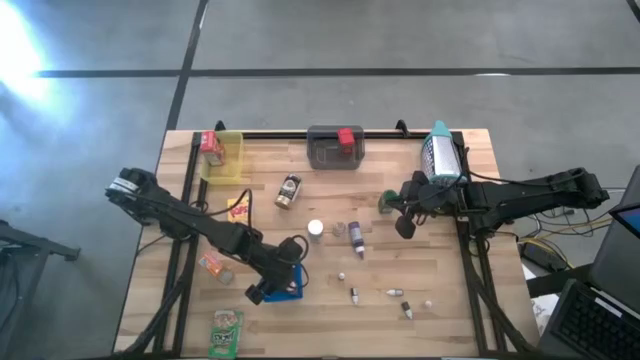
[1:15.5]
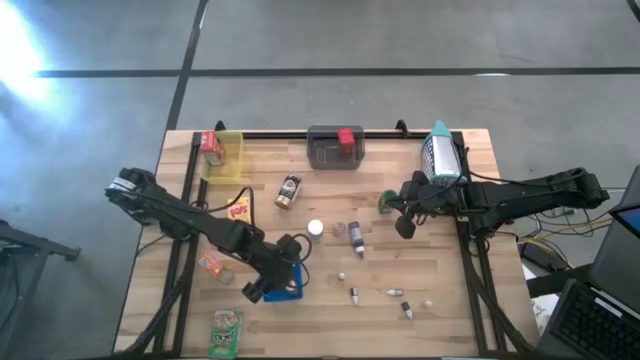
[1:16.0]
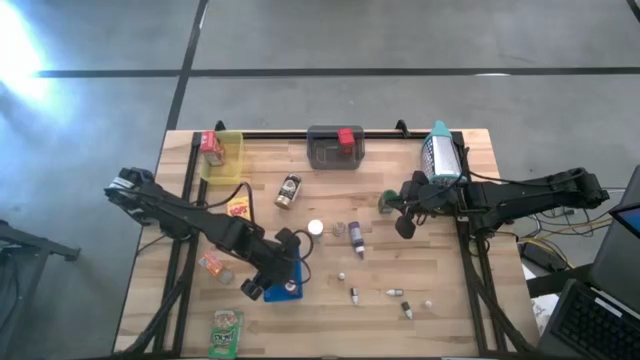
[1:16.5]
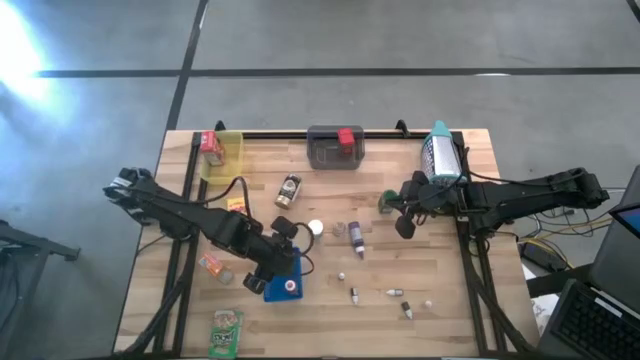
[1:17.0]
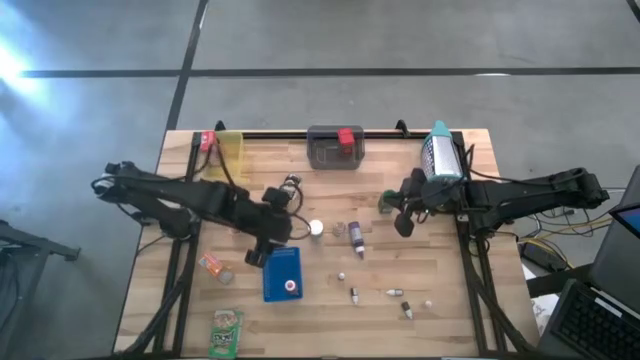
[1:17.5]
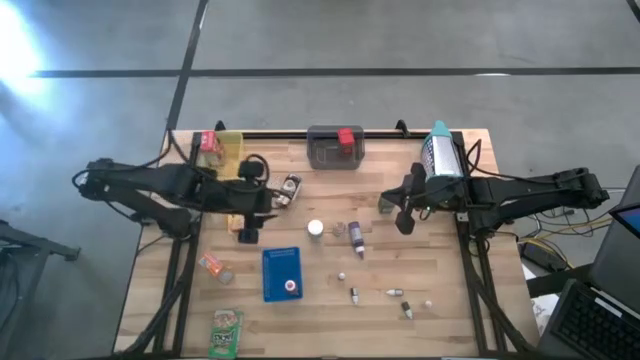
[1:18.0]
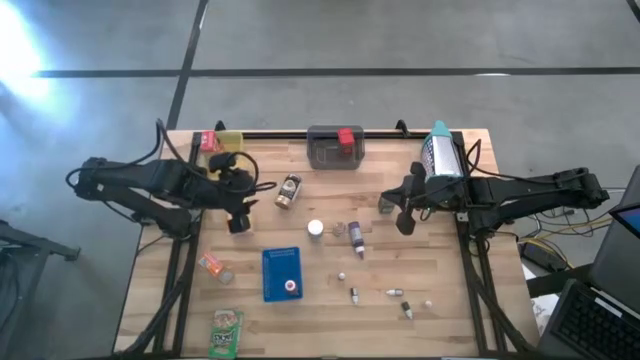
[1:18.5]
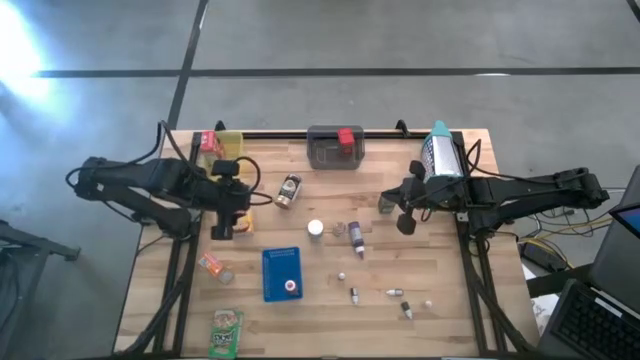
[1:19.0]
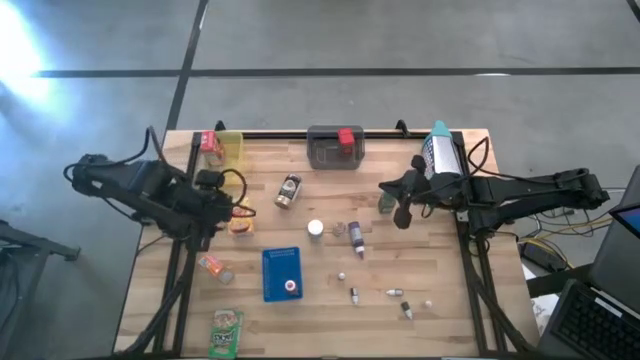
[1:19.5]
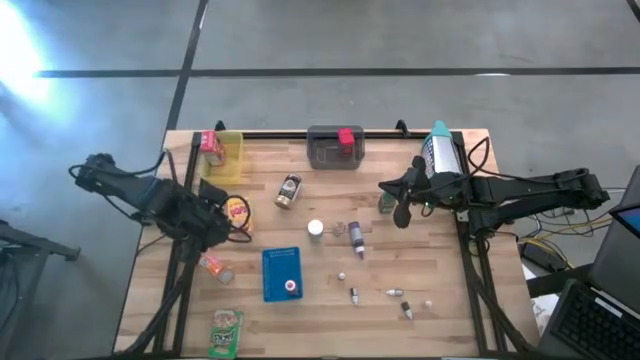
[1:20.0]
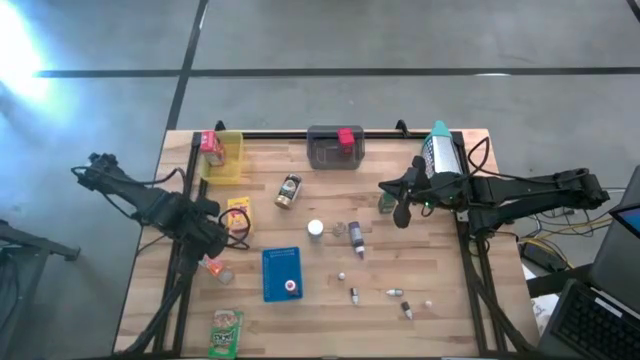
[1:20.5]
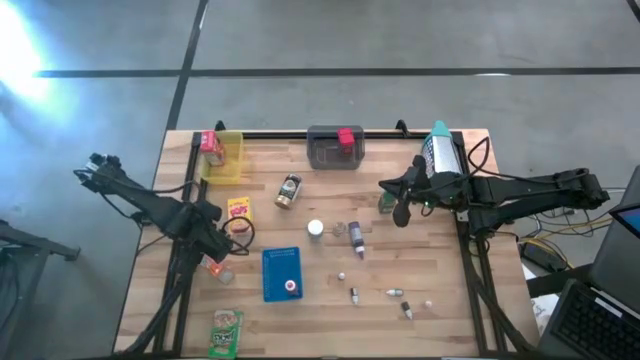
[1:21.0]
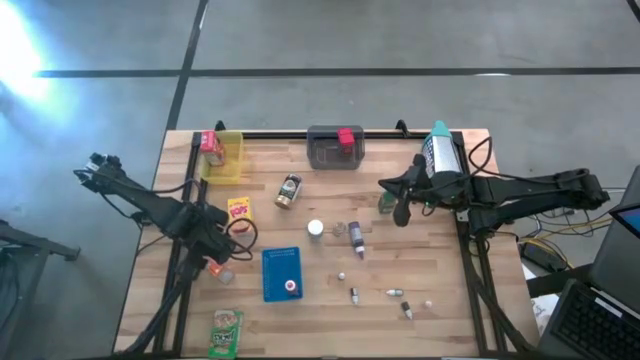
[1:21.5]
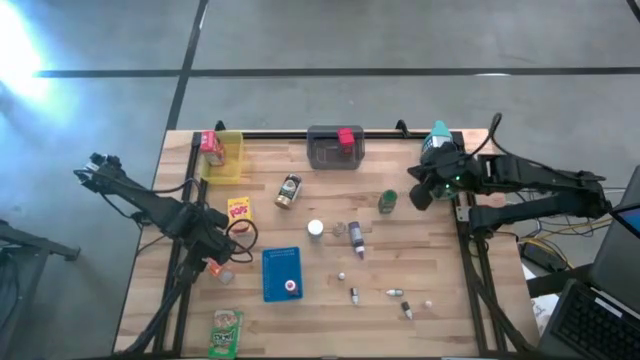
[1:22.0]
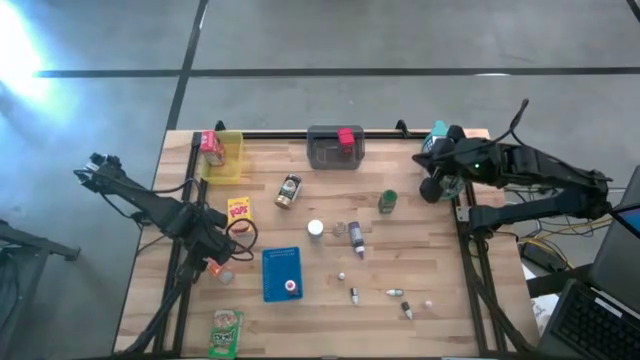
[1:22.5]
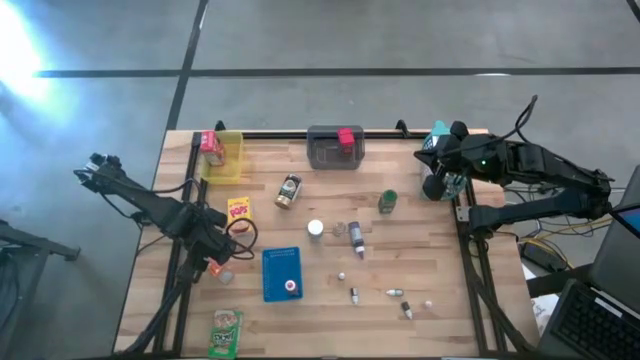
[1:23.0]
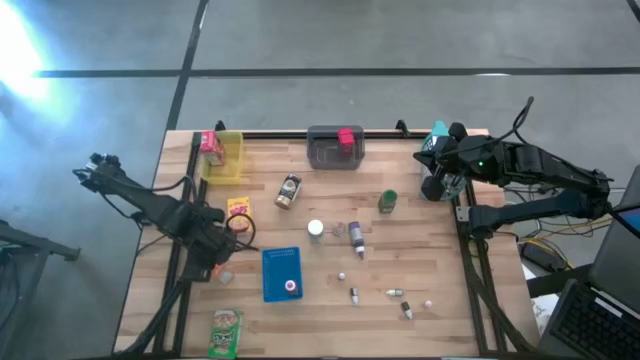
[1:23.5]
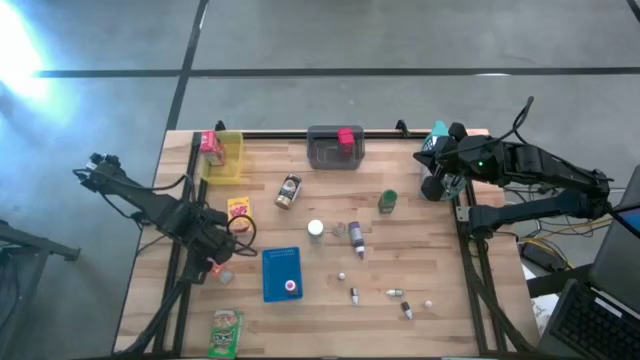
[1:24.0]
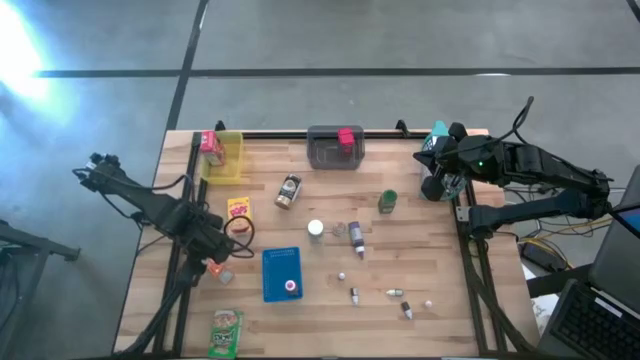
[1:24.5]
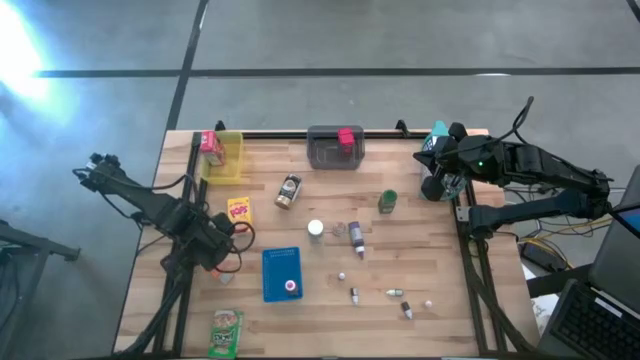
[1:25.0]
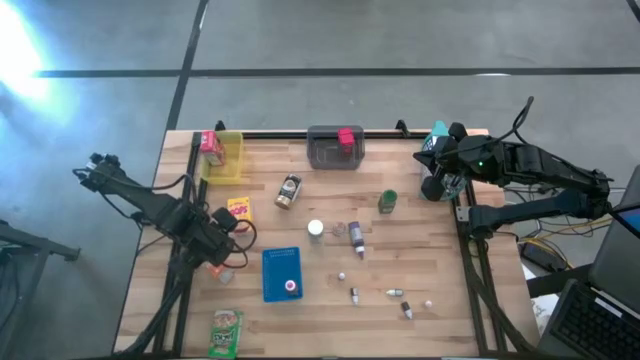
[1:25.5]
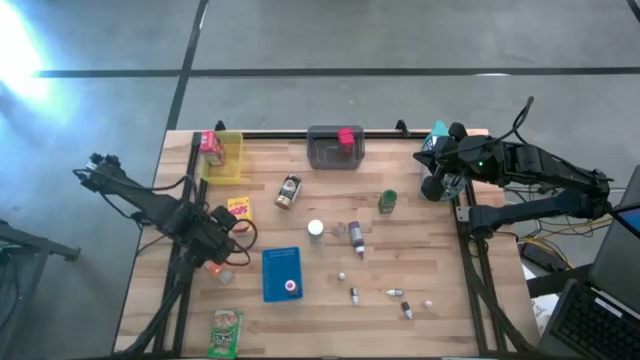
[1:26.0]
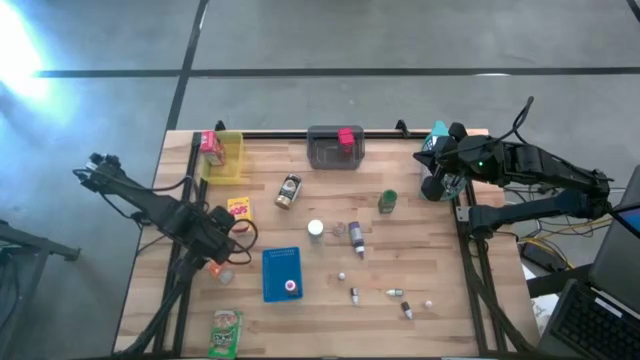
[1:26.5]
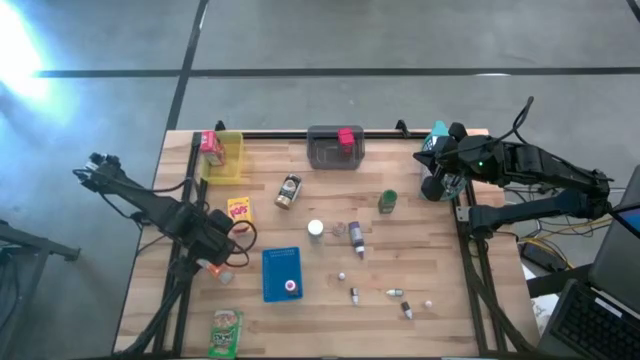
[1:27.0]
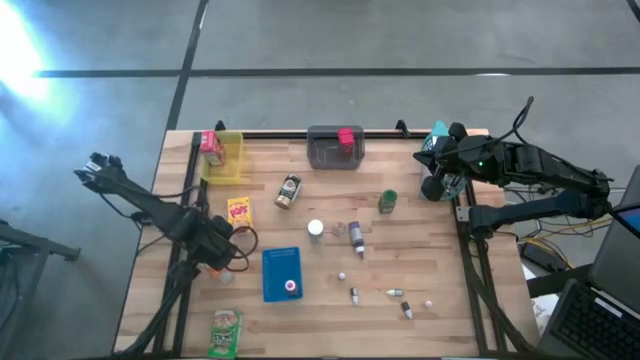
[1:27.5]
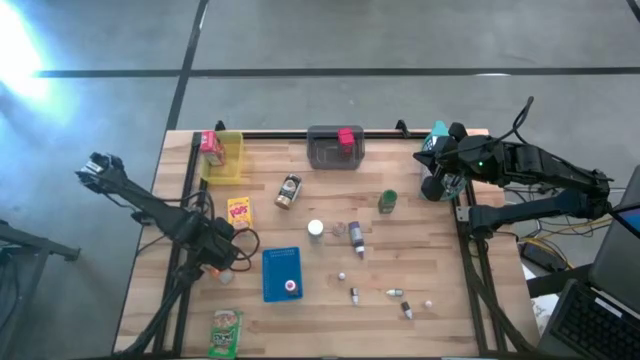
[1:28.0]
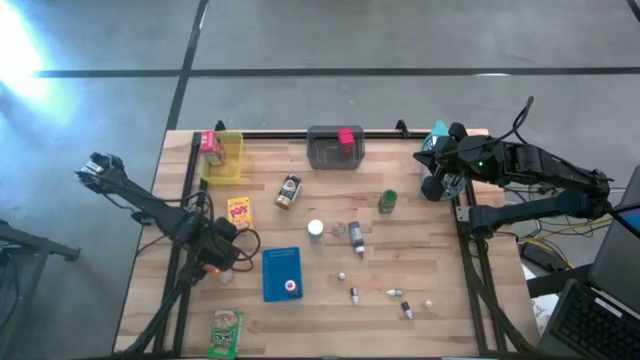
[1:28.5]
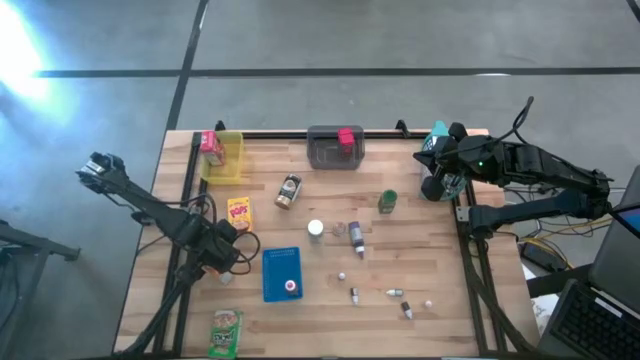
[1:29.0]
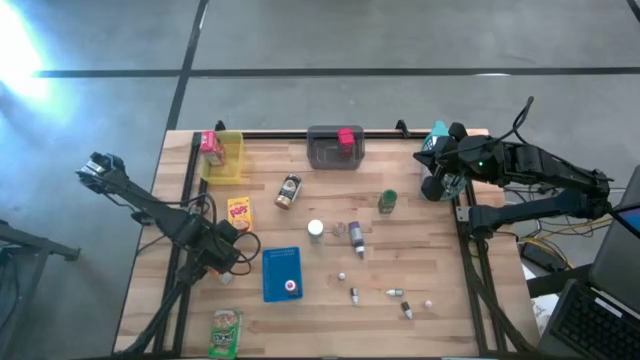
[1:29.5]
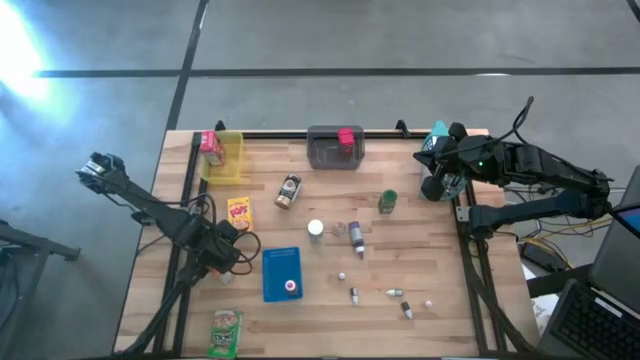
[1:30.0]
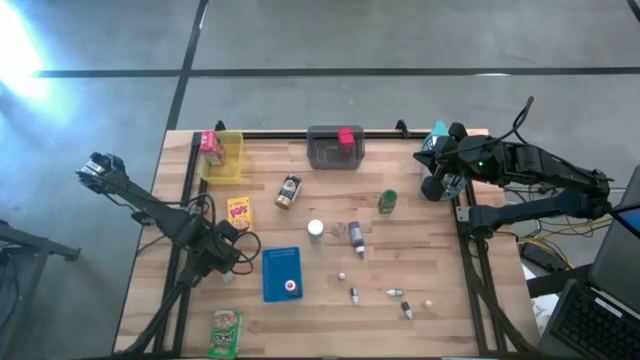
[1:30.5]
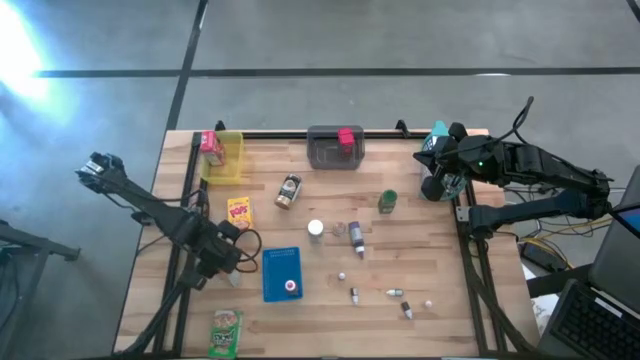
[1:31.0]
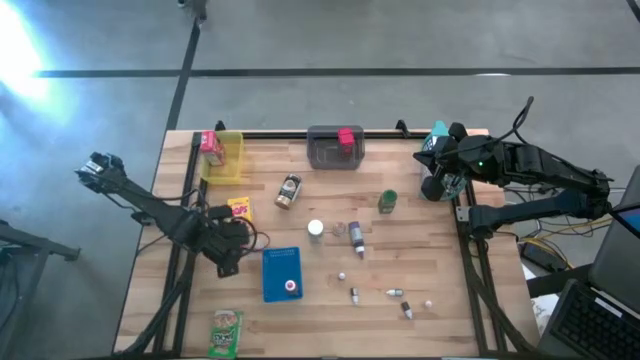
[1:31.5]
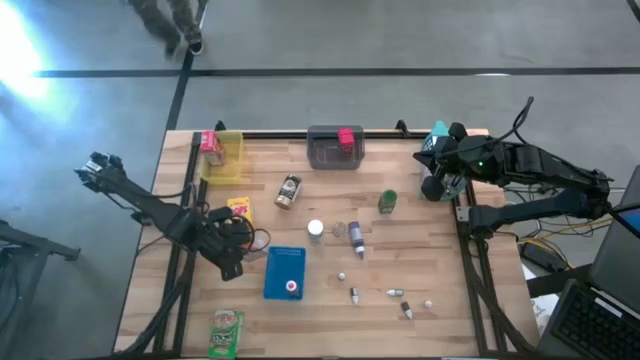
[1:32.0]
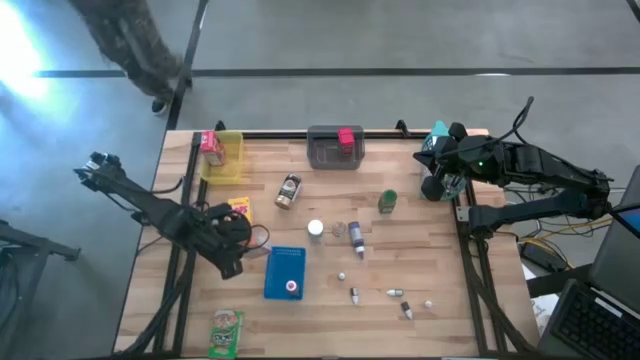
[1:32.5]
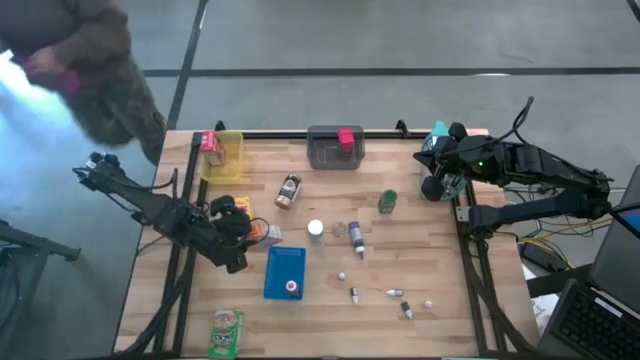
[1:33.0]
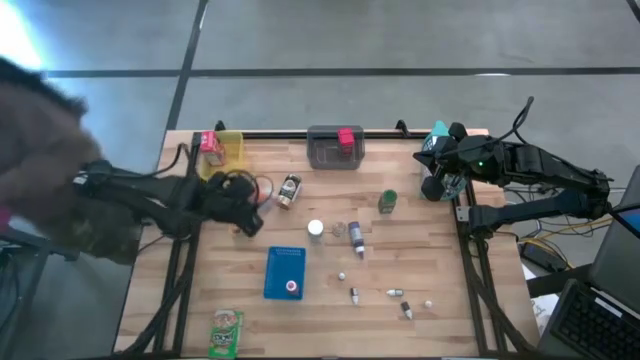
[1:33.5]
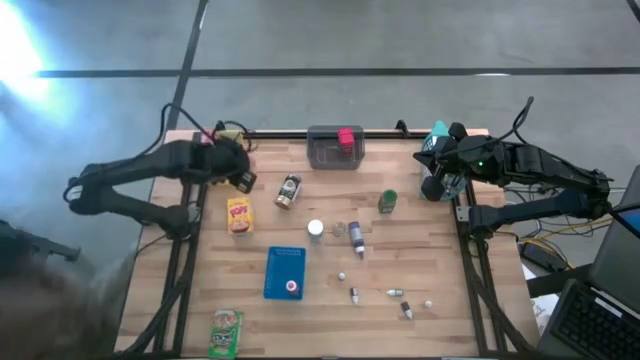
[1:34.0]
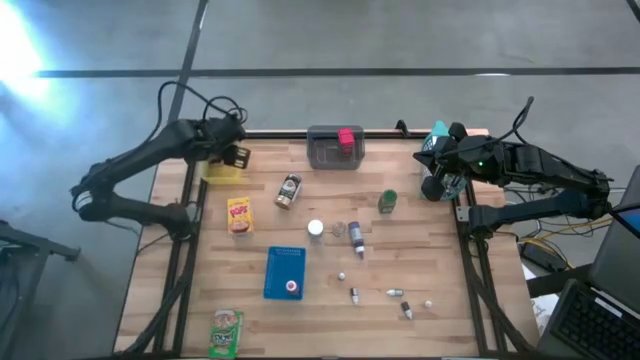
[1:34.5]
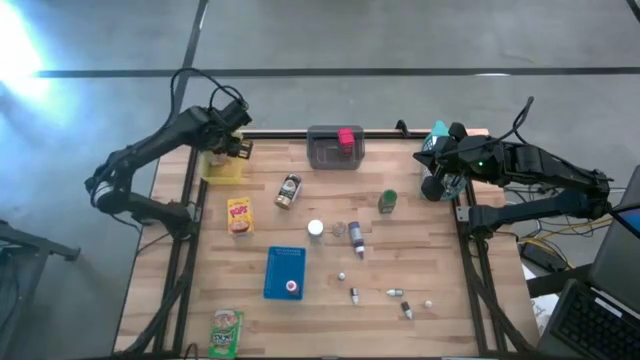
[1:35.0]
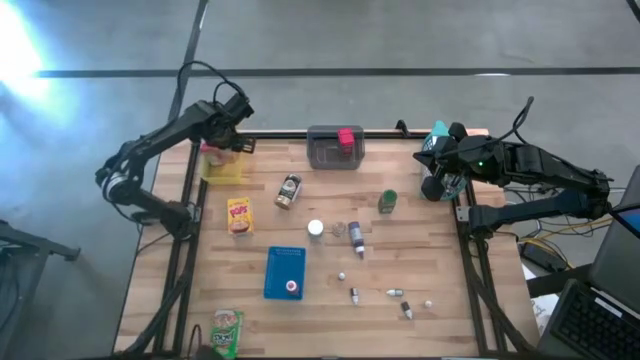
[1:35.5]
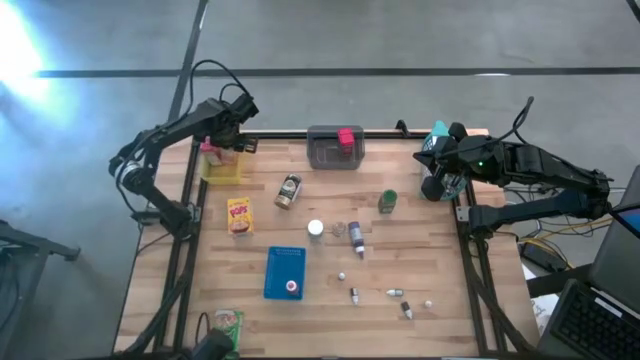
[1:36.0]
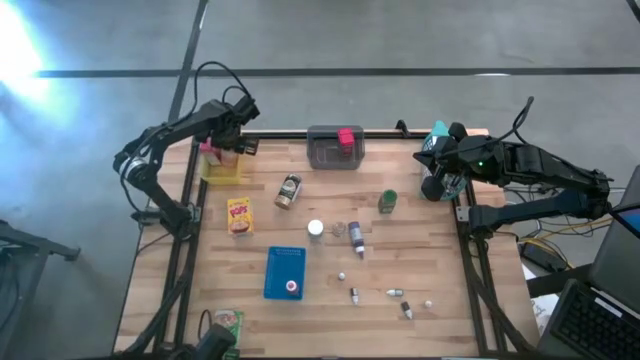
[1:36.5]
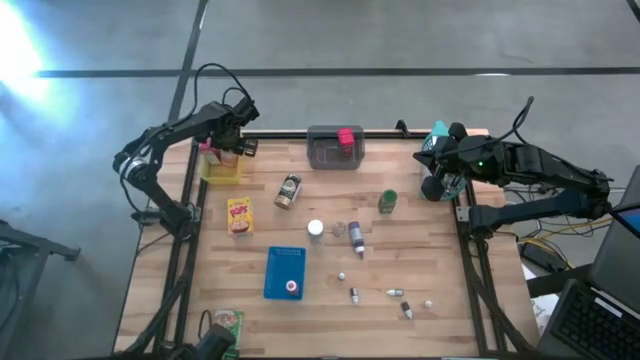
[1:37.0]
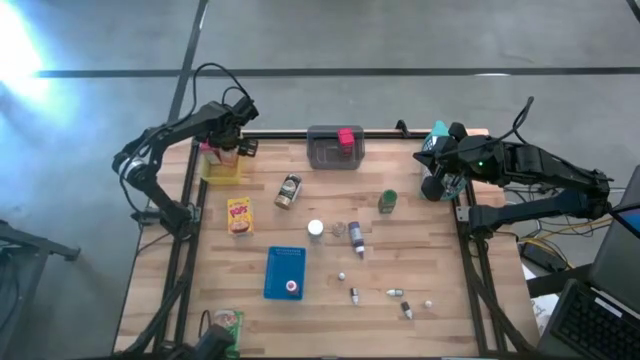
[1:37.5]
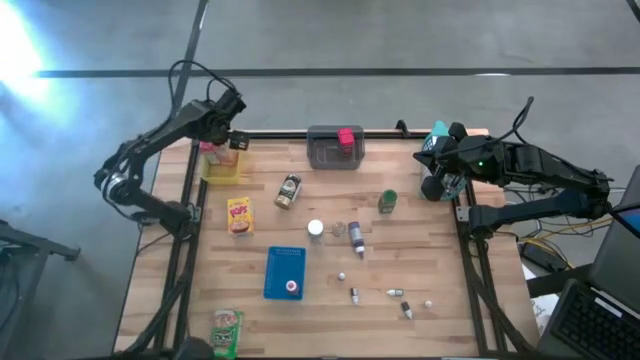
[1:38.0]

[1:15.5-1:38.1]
Task: Pick & Place Kitchen Items
Put the orange cereal box into the yellow bin
